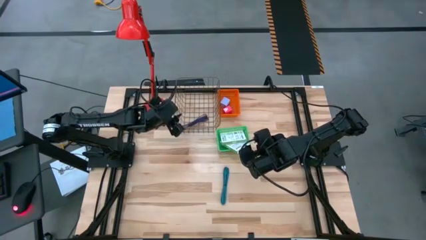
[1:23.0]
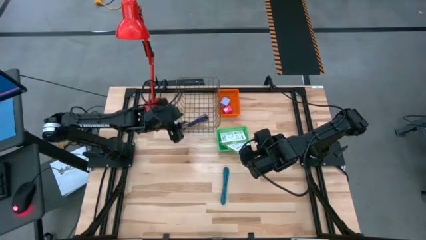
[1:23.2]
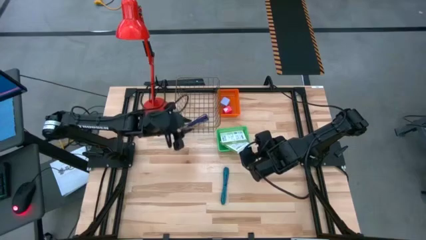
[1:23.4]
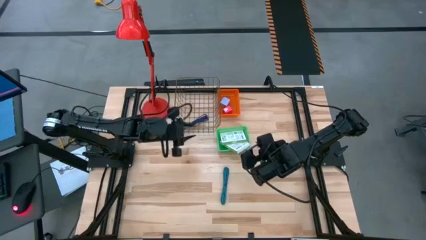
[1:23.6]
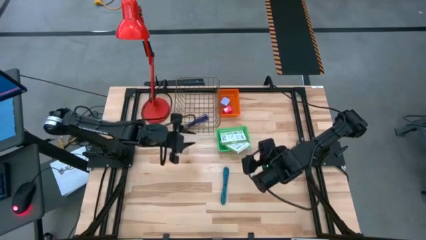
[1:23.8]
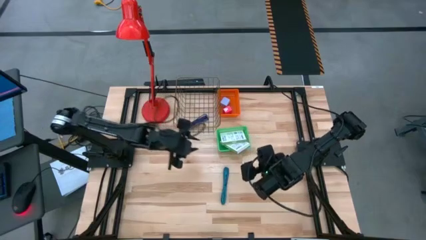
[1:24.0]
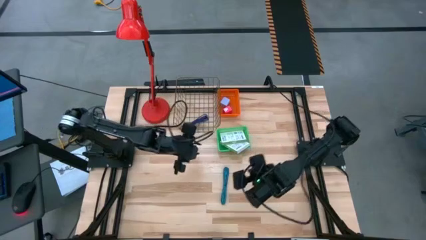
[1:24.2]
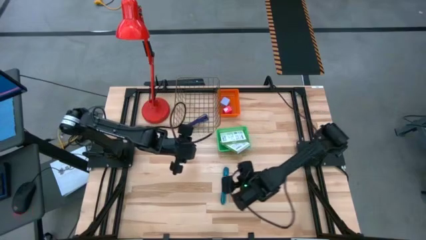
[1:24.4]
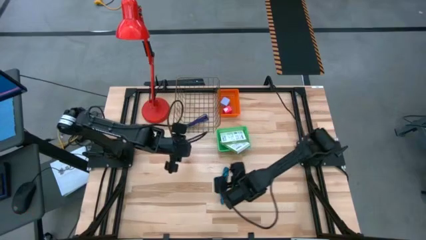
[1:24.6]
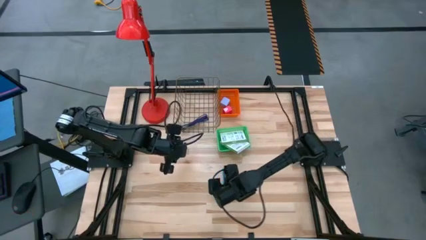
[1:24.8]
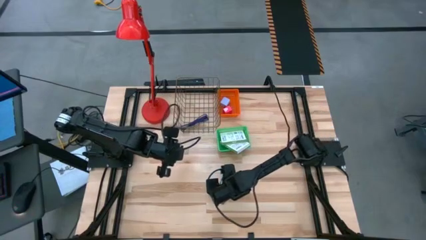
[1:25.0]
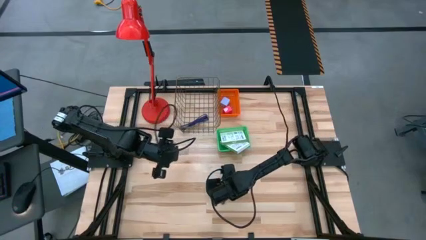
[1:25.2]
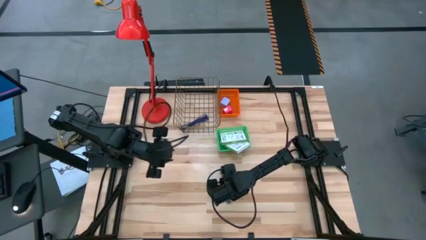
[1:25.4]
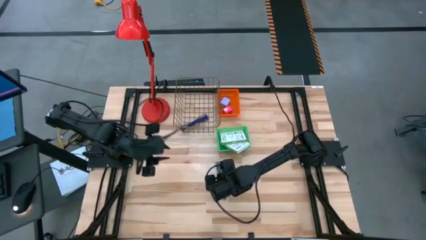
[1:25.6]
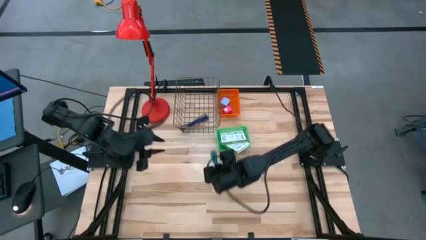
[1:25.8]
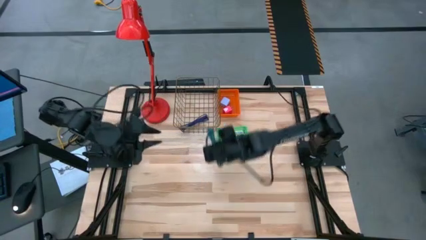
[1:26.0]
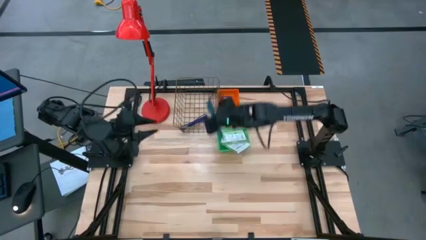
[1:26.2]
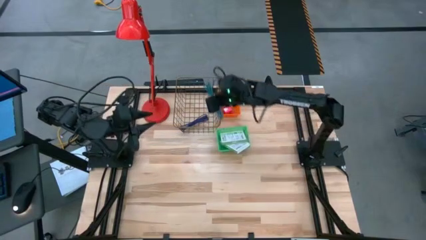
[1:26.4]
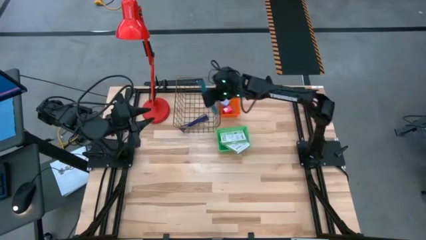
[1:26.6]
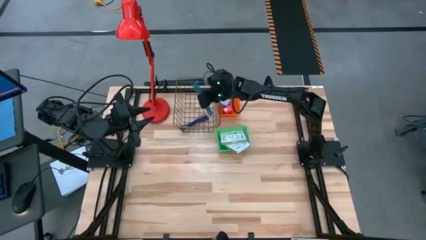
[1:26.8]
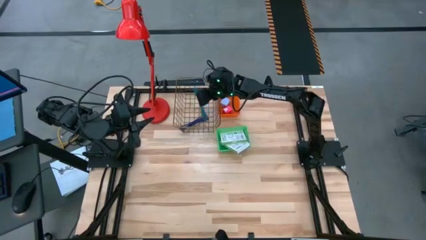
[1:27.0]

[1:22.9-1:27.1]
Task: Pick and place items into bin
Put the blue charger cable into the black wire basket

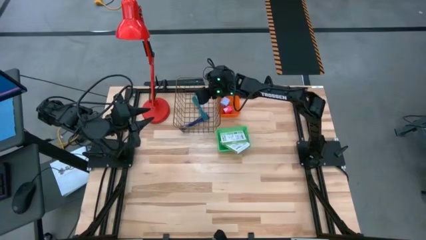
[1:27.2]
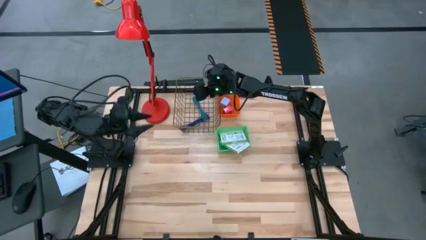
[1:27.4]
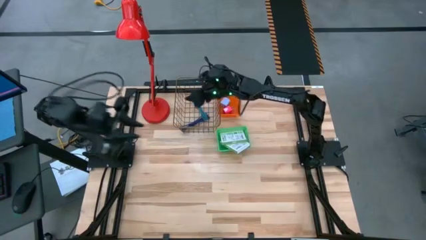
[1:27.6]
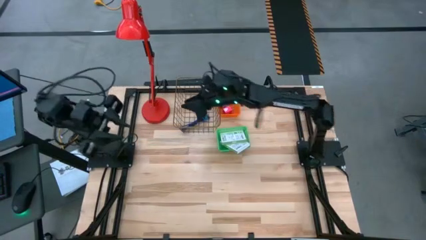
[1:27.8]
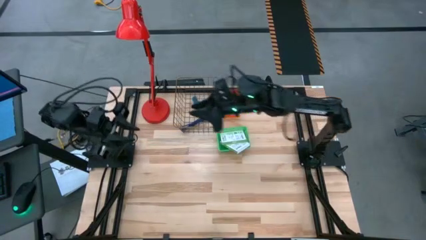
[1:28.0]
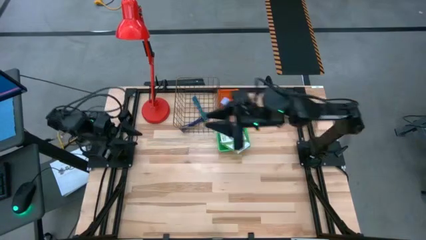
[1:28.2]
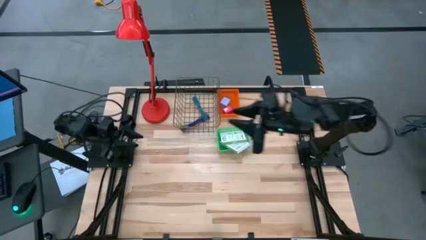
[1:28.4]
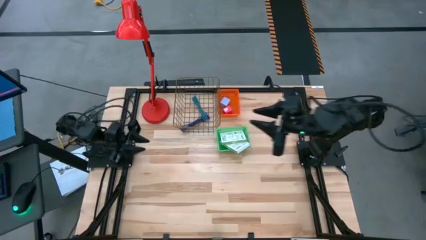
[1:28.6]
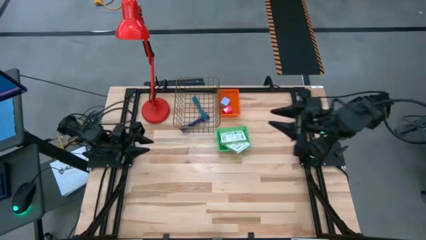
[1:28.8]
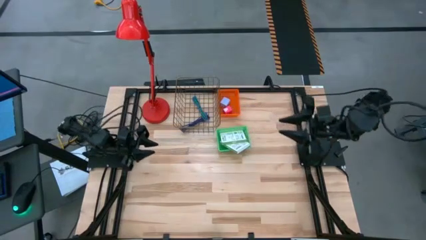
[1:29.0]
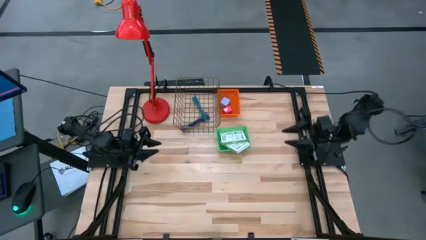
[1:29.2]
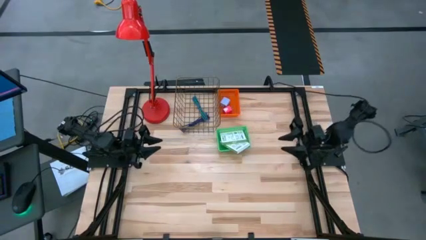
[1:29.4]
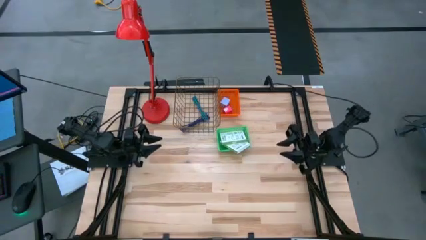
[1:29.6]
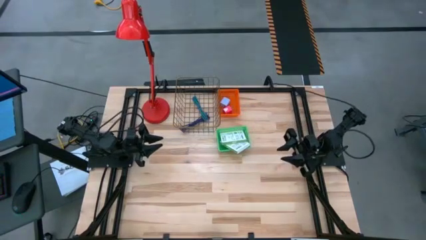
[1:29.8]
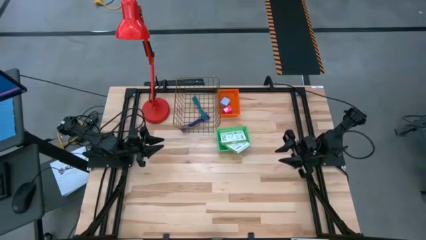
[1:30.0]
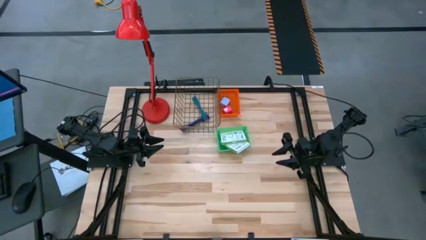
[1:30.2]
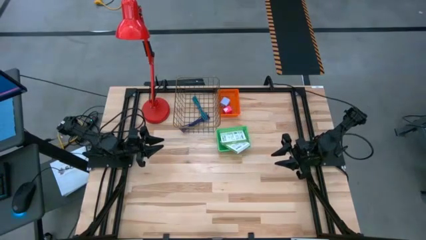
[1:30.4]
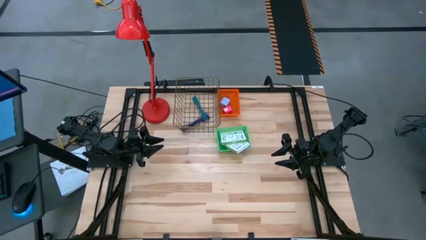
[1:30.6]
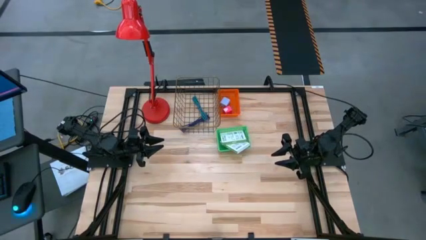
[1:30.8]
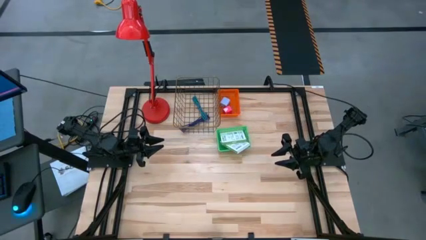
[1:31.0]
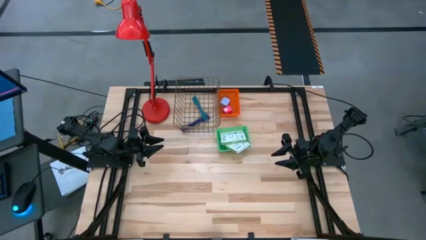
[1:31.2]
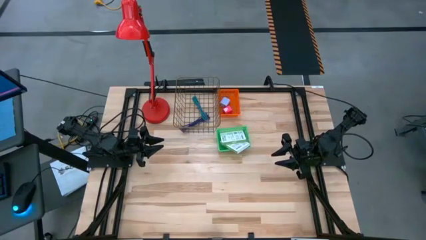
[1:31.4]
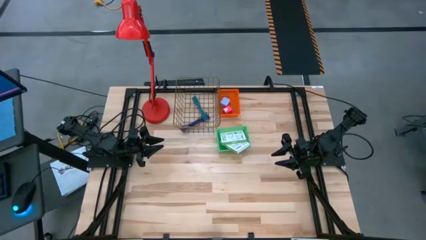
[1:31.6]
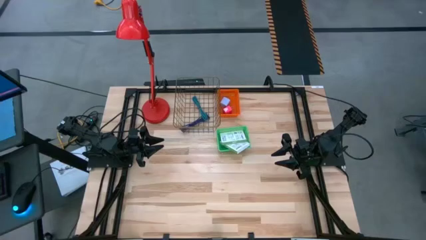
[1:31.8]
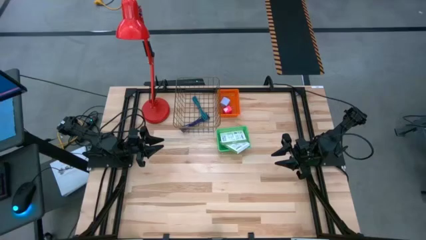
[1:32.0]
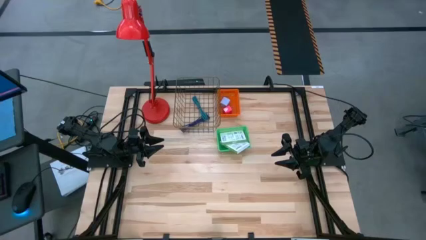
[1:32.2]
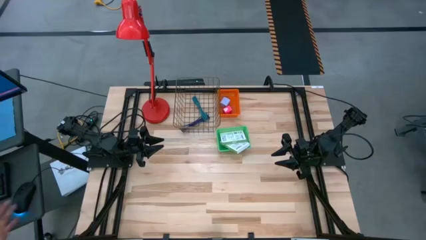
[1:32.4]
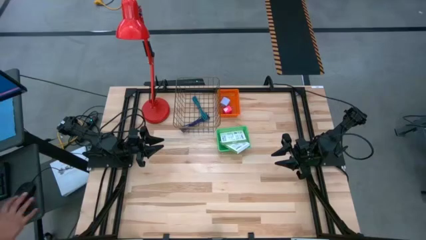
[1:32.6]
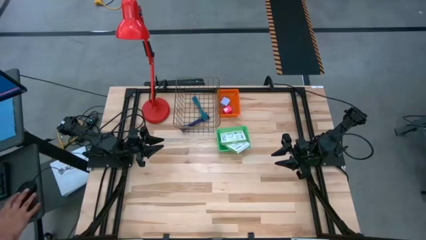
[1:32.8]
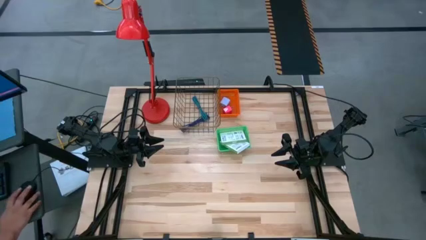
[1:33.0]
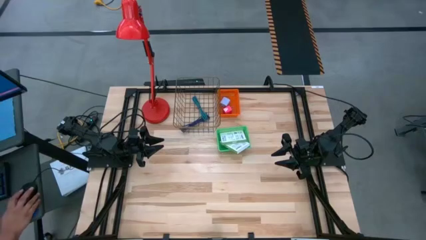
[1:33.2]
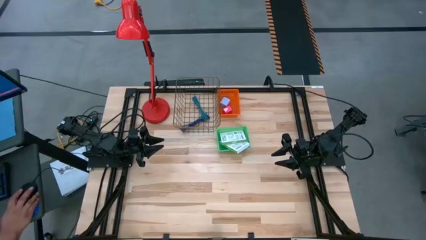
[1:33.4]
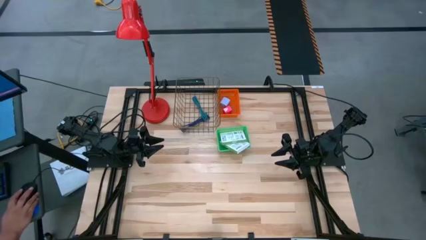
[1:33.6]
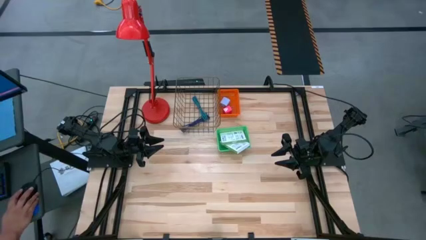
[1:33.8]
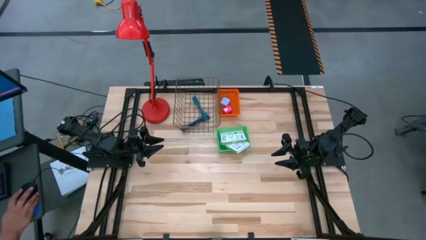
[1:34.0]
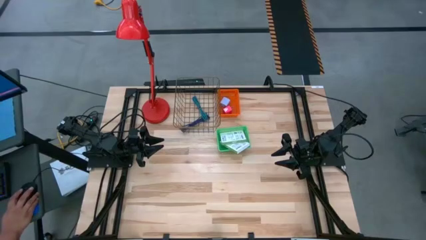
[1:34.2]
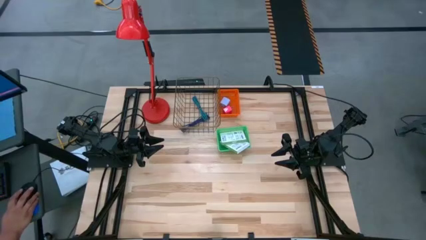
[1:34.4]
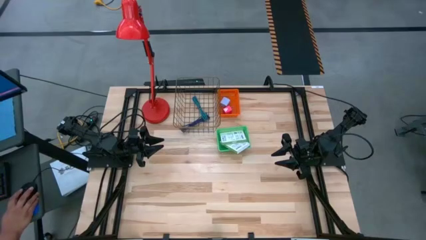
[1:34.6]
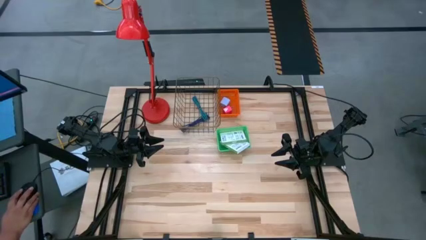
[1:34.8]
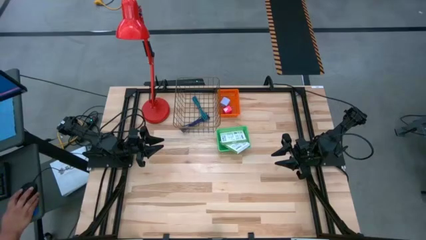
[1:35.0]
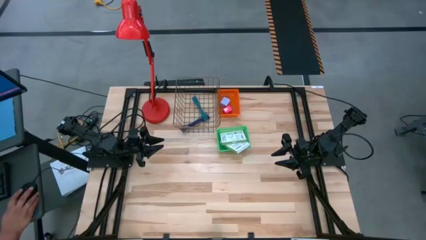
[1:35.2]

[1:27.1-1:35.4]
Return to Home Position

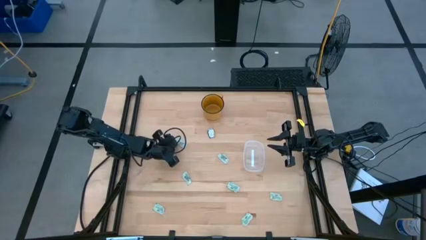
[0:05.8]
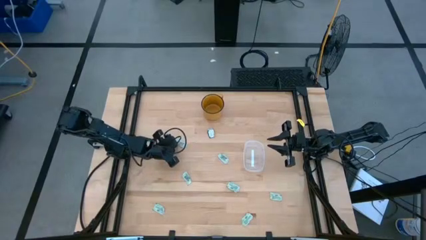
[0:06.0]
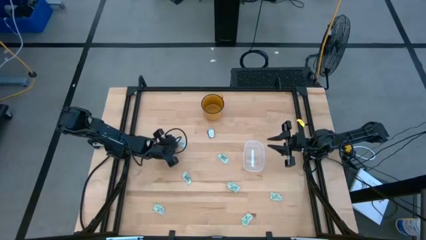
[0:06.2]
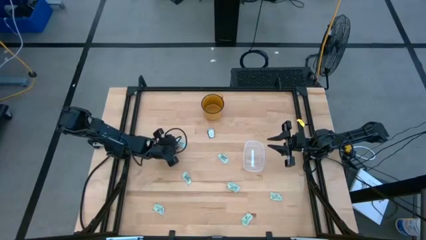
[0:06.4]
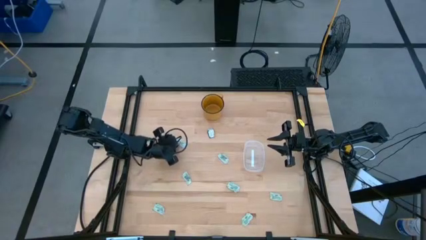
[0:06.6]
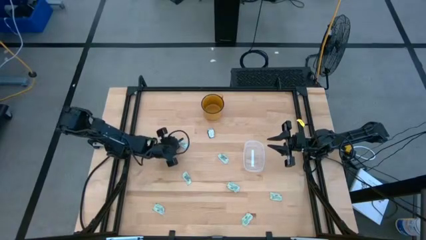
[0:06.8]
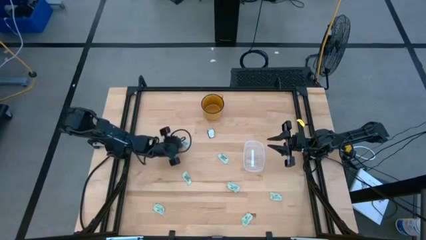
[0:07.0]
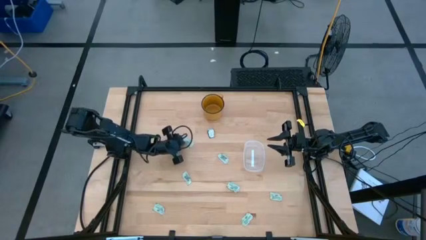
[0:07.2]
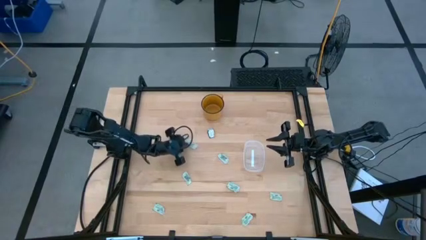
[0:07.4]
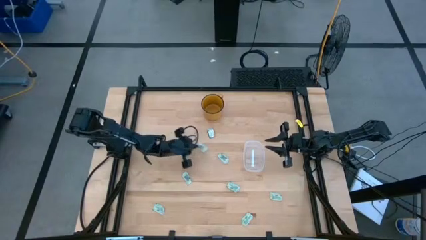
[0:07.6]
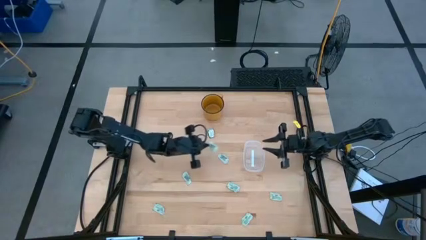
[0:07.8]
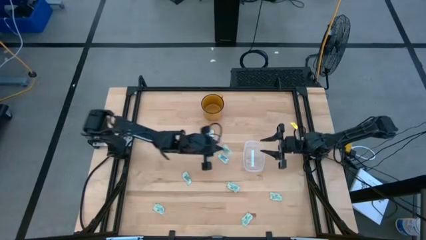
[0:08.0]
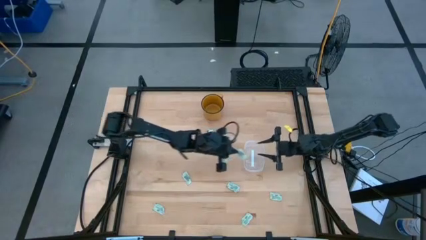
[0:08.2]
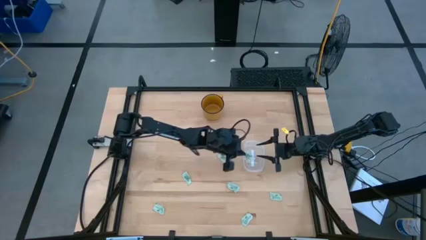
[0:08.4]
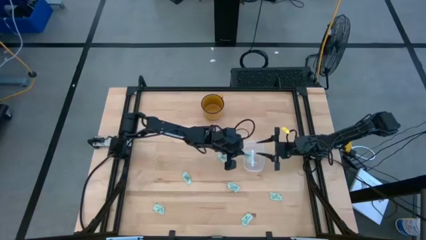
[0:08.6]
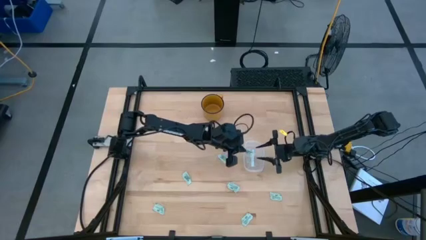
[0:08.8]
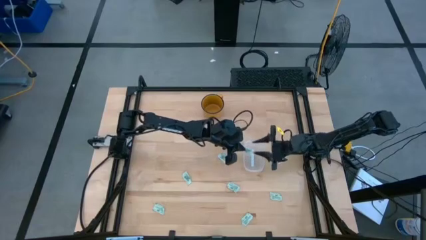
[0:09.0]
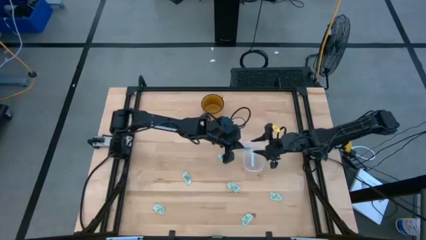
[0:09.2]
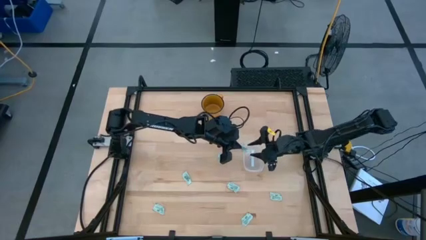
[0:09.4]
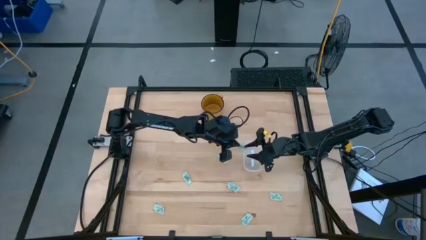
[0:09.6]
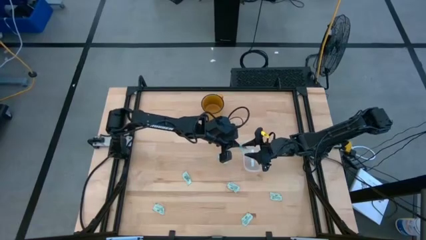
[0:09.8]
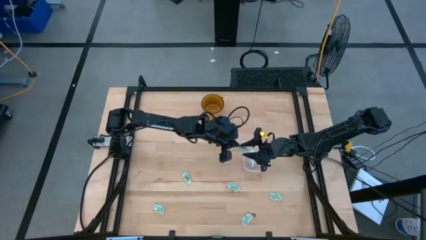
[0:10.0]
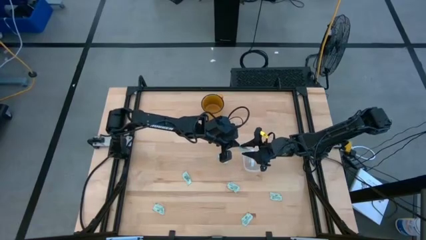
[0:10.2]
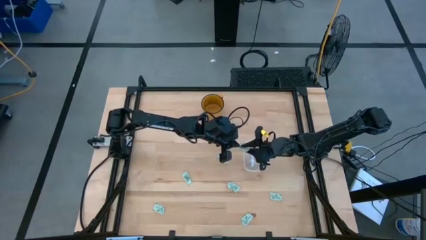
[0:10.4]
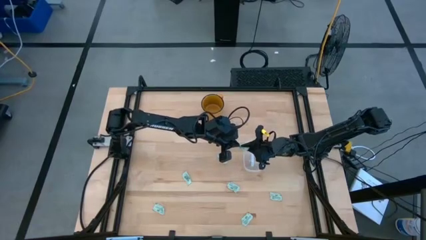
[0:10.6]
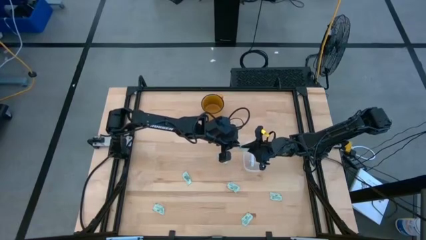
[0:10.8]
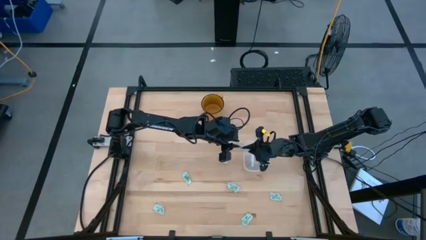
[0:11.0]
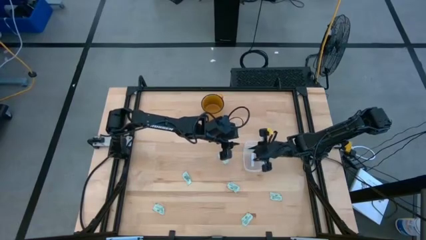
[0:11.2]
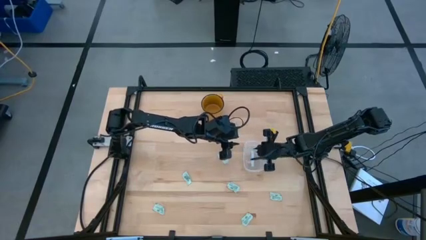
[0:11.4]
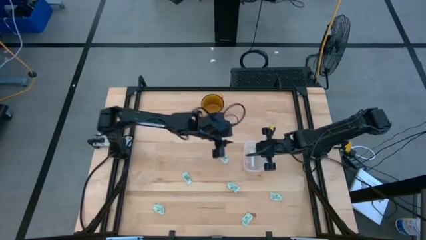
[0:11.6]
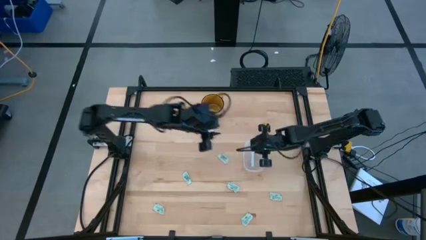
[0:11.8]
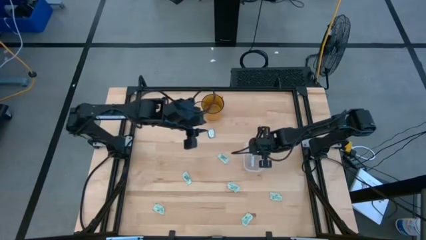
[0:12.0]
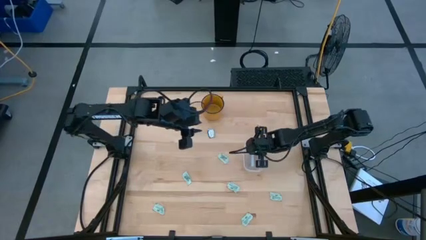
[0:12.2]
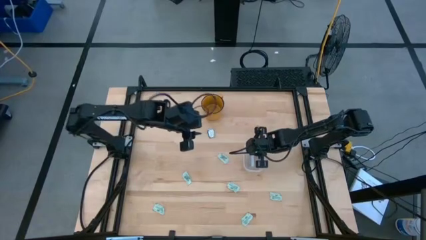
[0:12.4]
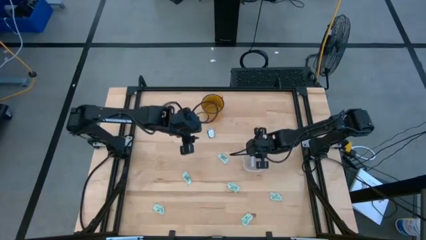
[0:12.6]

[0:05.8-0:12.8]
Task: Pick and place Stevia / Truvia into bins
Put the white stevia packet into the transparent bin
